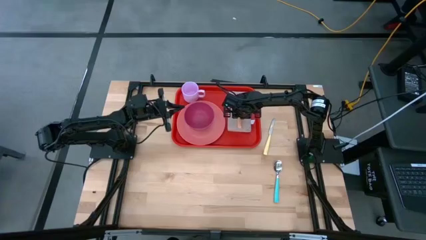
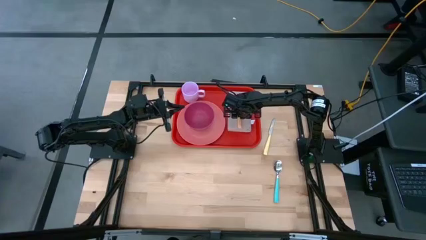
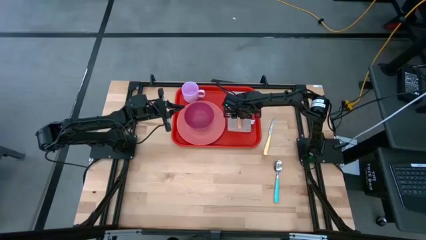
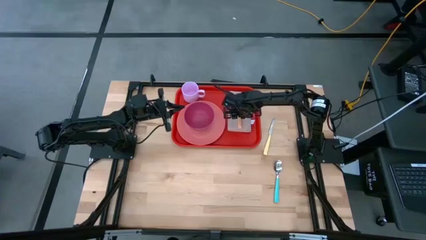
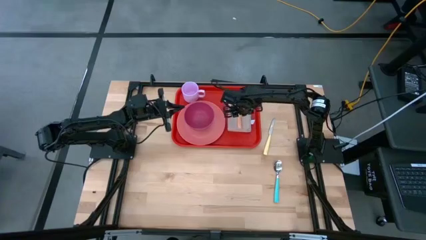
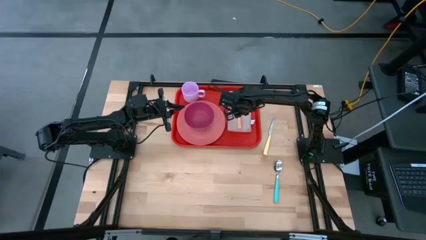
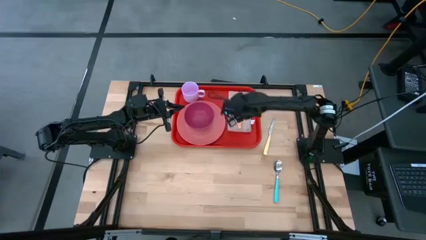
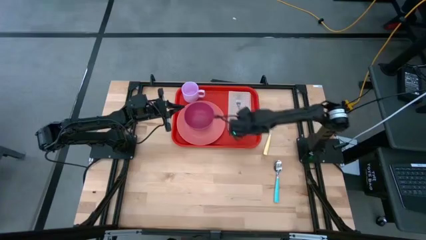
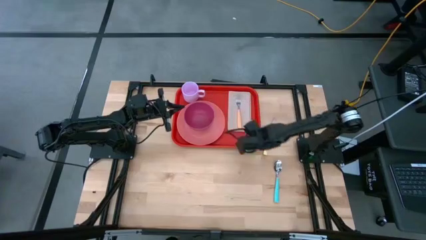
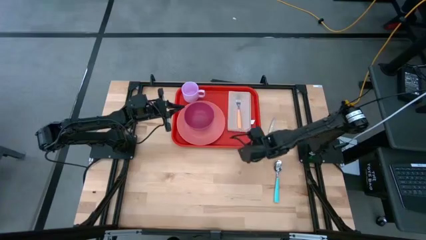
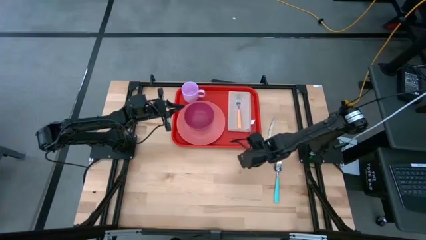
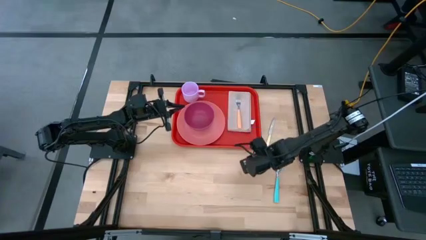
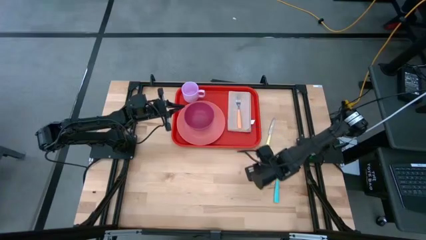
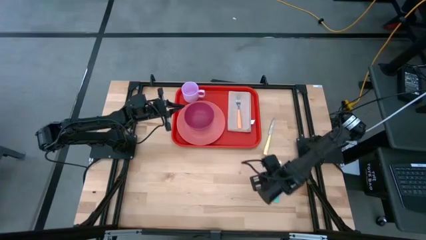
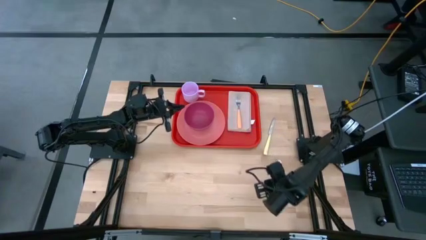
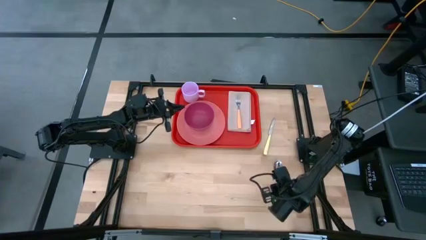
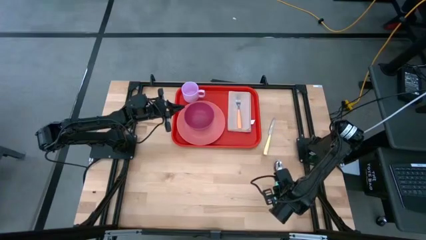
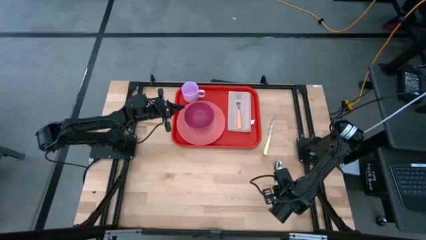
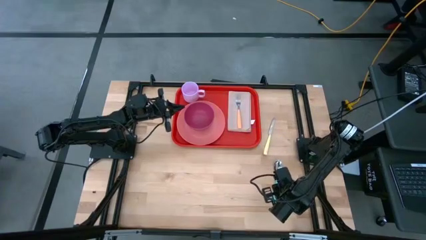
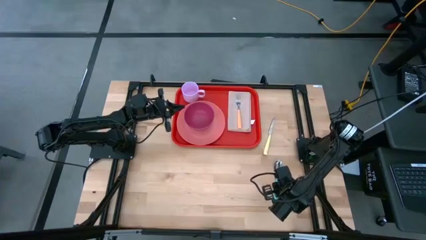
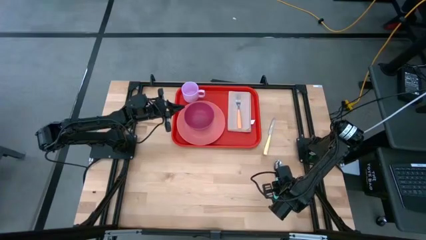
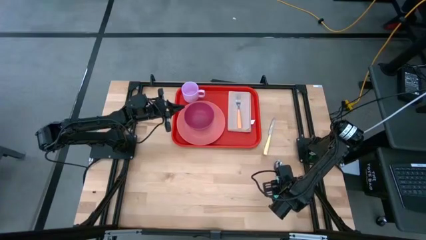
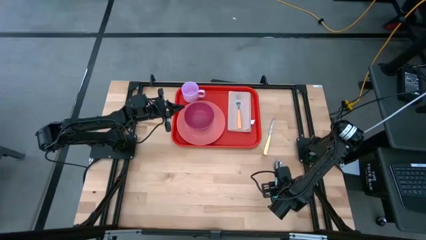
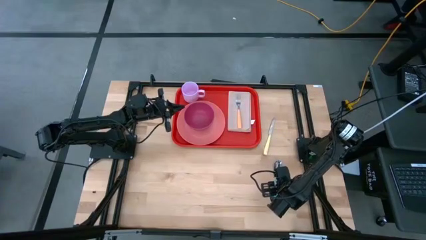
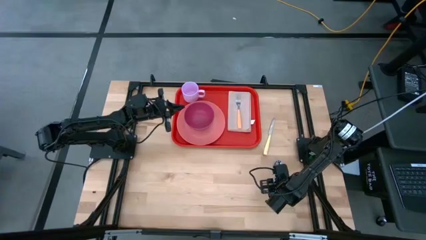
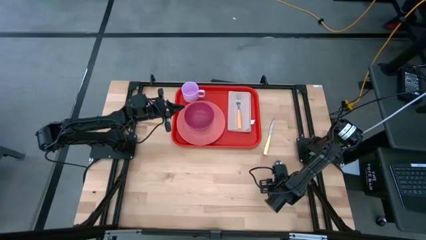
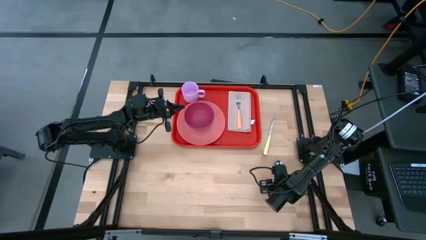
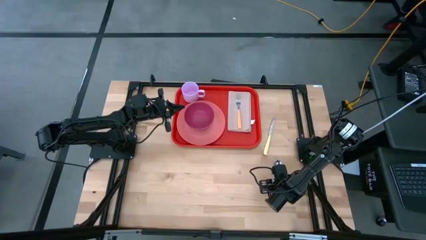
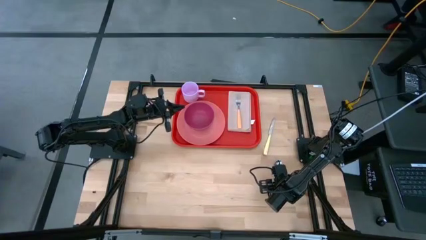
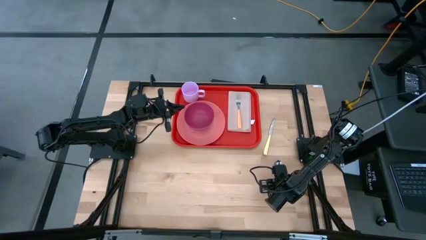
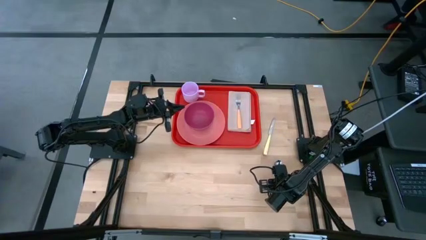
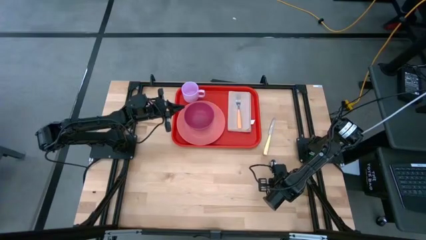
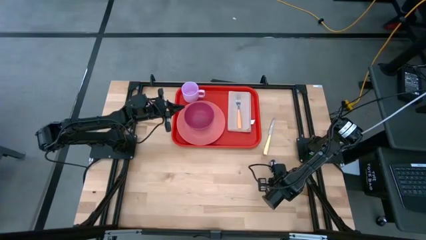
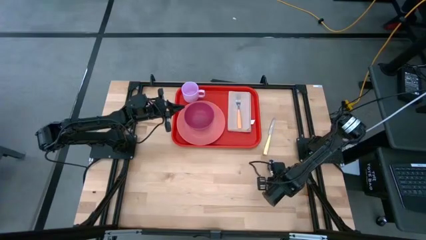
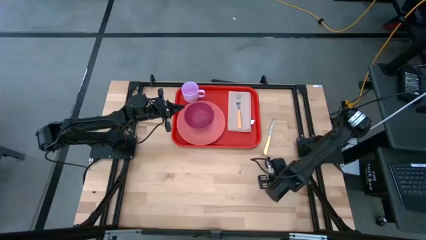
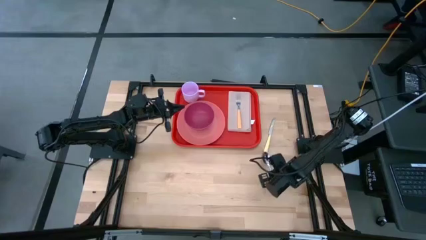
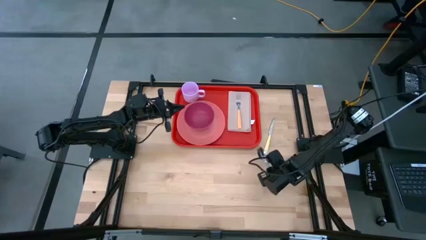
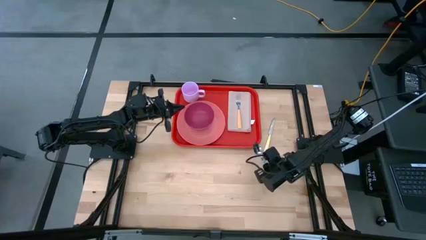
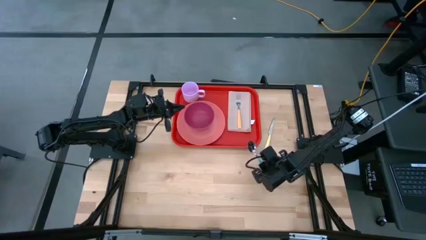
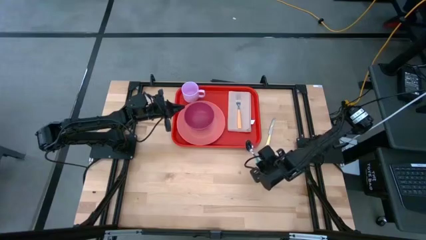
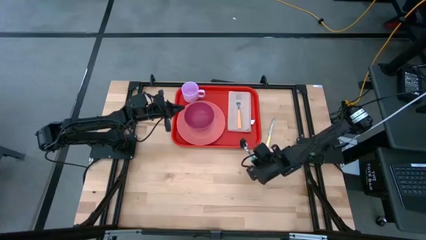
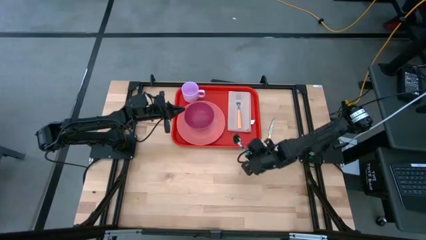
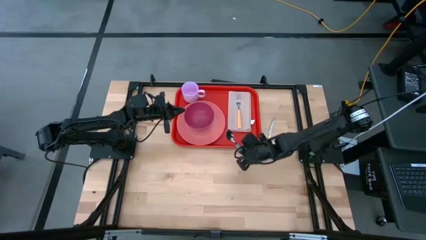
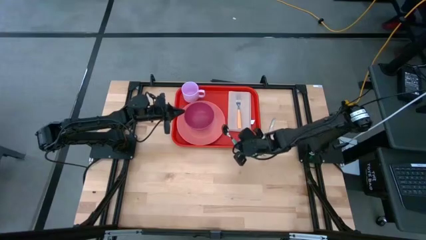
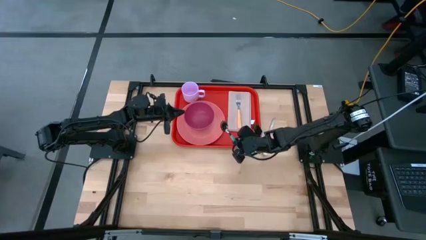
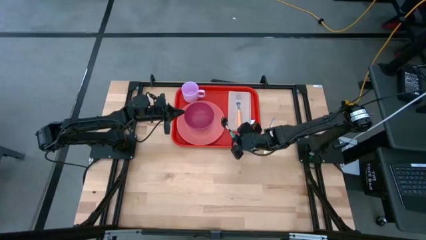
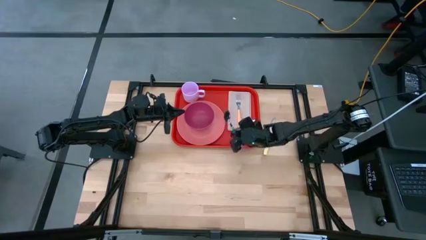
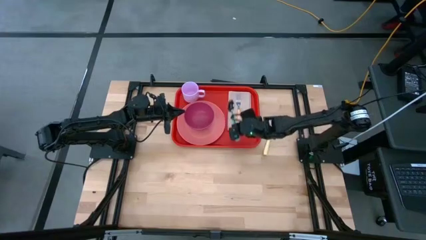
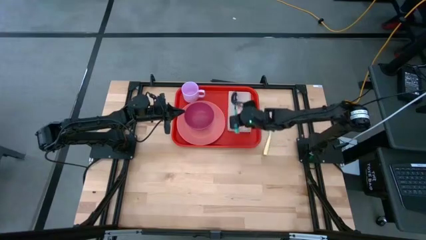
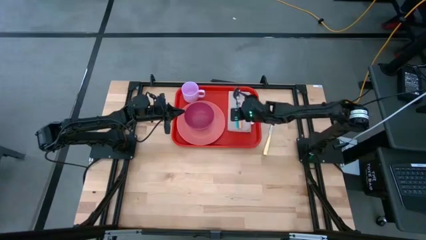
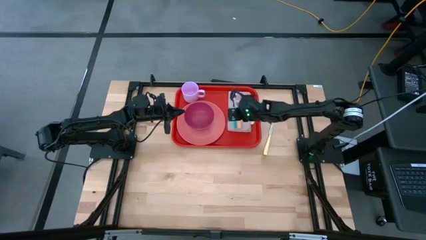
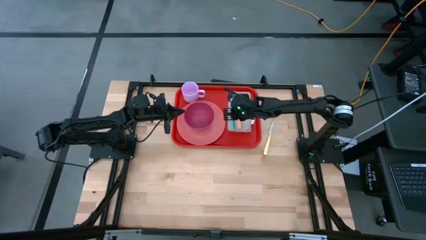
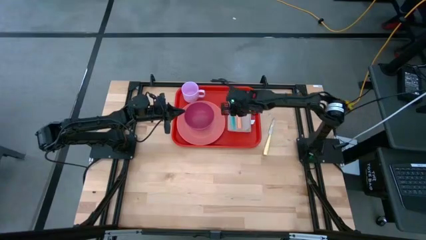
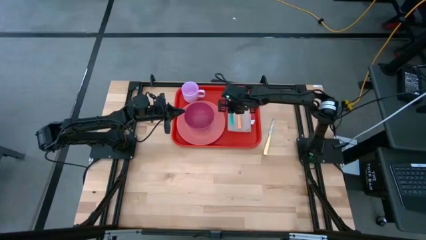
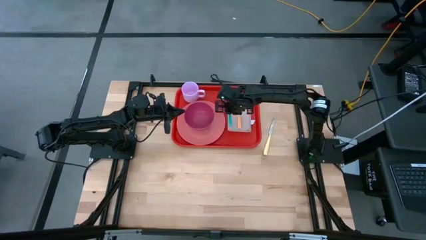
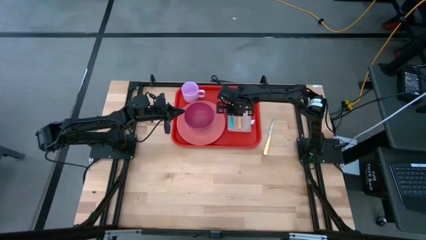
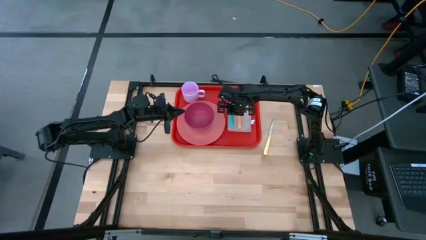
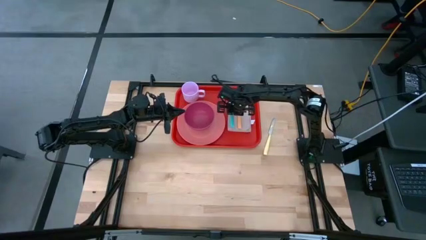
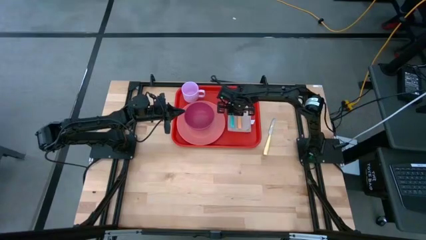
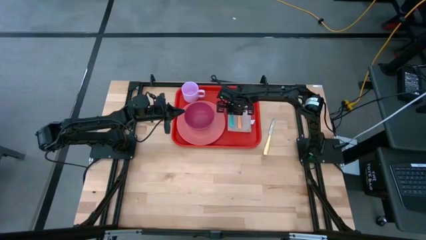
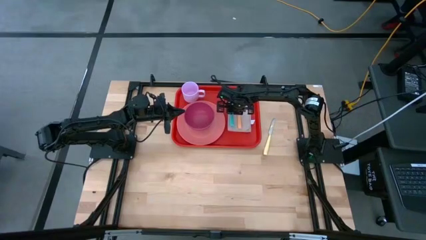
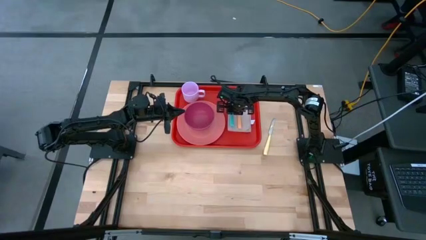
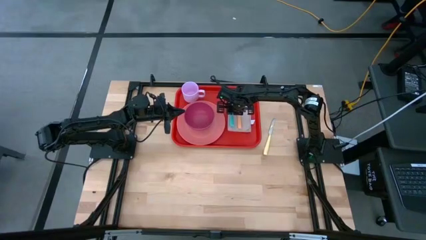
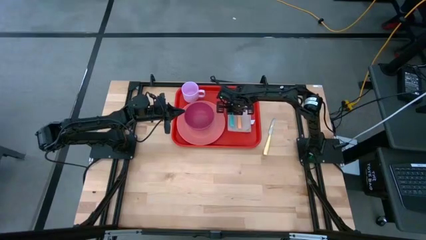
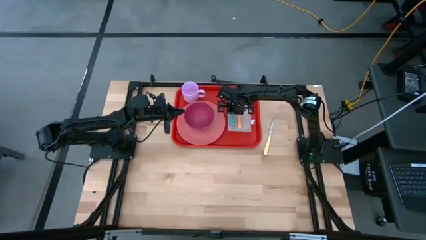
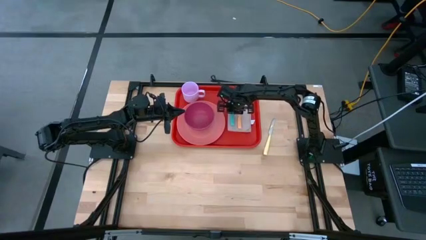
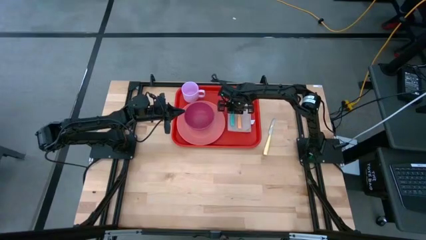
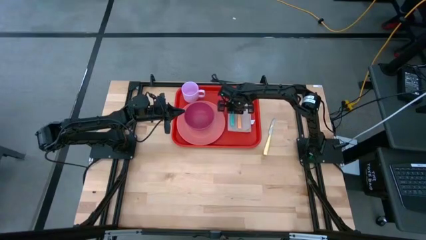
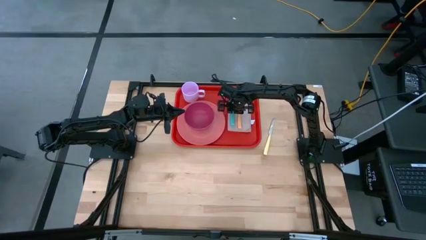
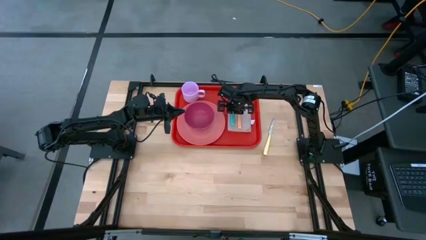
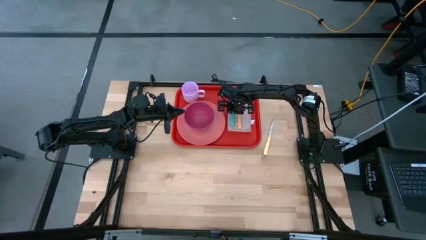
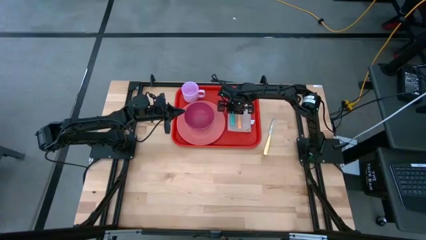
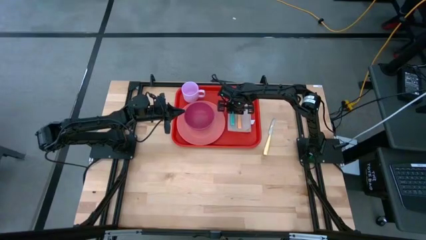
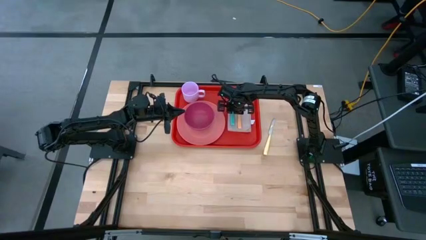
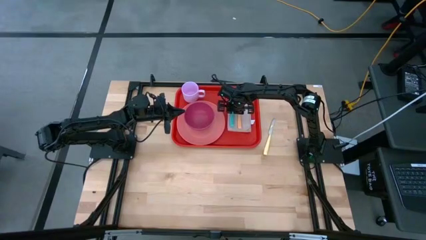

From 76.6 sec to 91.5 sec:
Task: Set up tray
Put the blue spoon on the left of the orange fork on the red serving tray

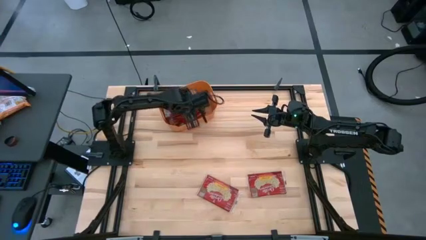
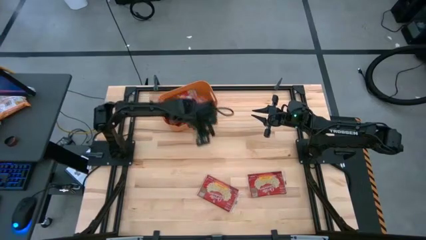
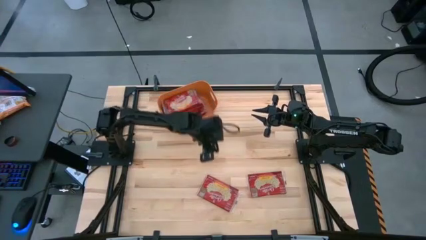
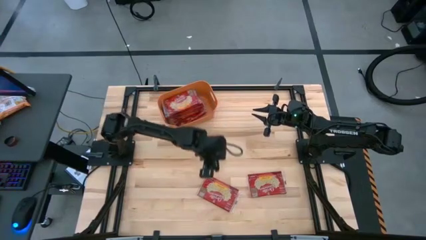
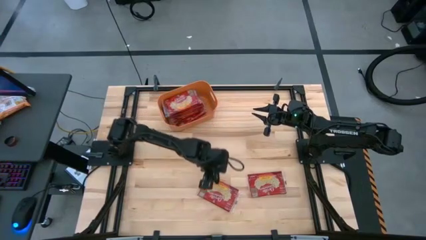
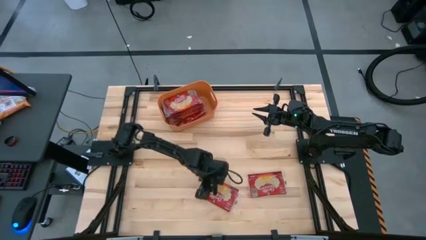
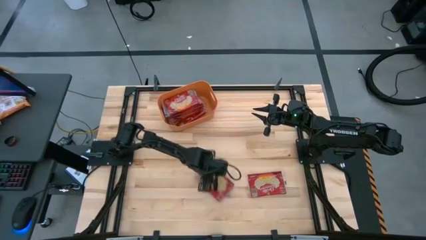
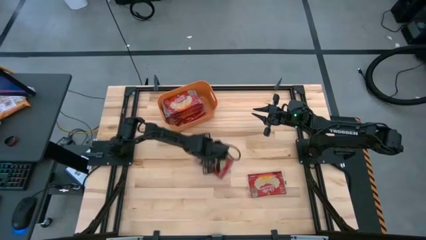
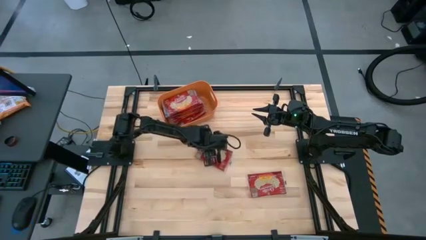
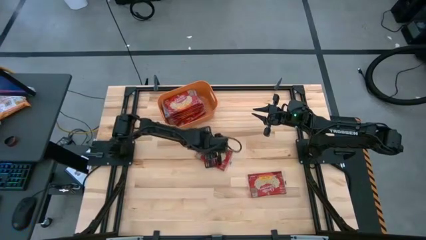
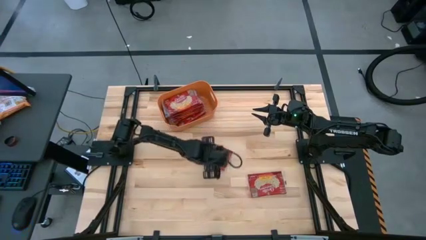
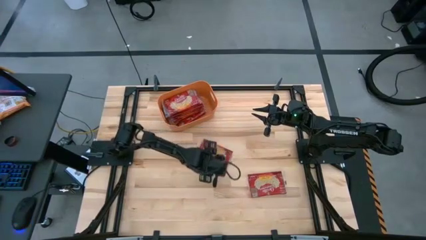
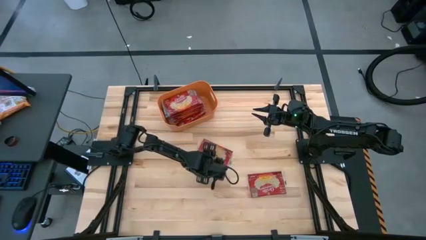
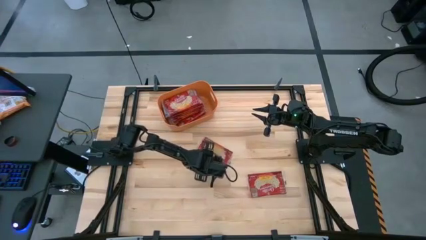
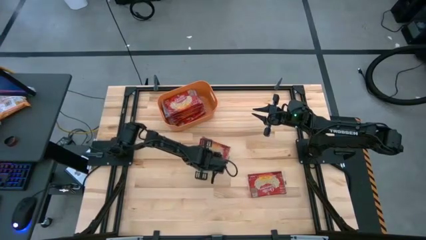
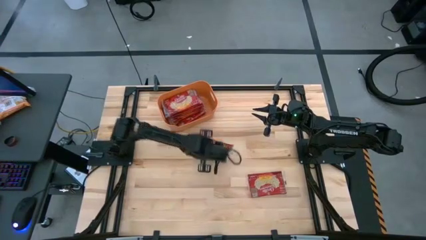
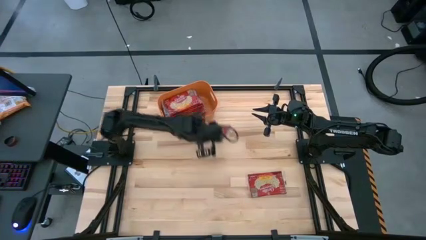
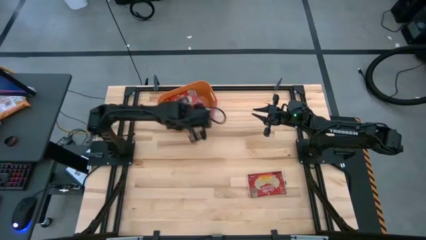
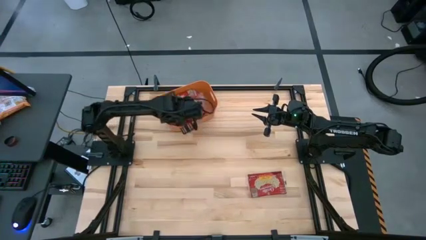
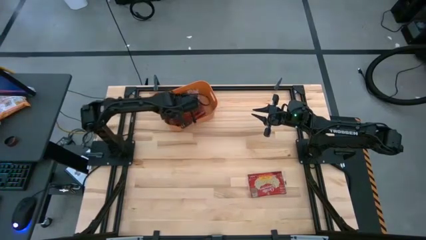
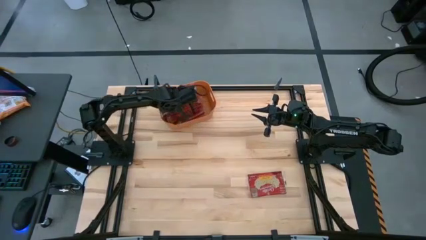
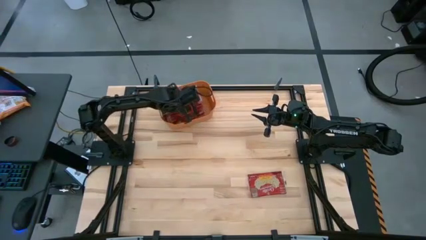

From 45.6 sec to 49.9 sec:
Task: Sort popcorn bags into baskets
Put the center red popcorn pack into the orange bin
